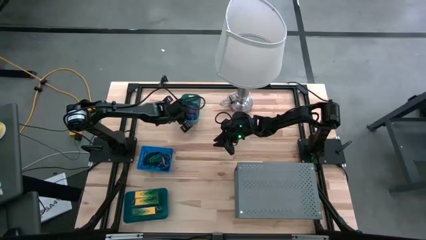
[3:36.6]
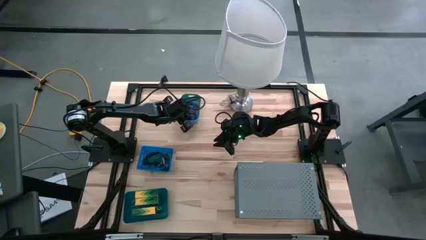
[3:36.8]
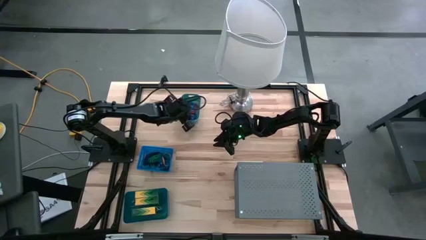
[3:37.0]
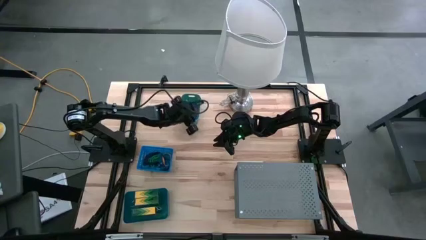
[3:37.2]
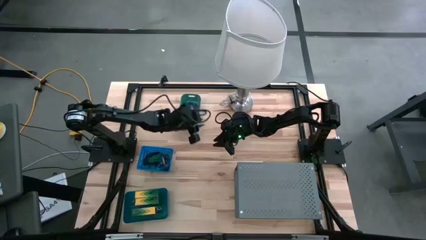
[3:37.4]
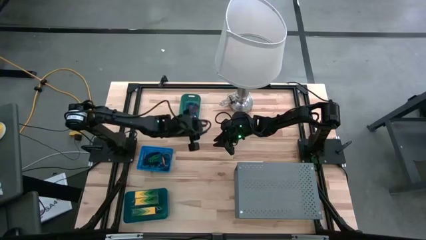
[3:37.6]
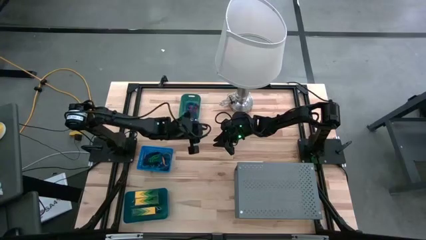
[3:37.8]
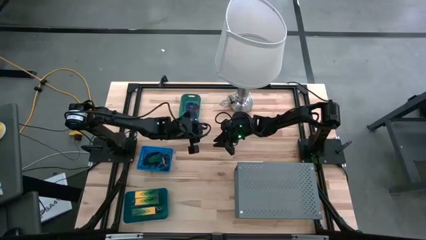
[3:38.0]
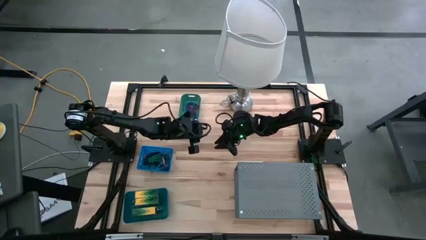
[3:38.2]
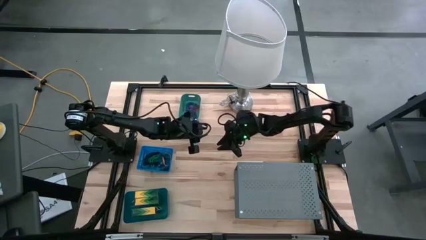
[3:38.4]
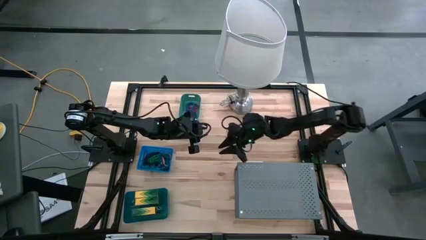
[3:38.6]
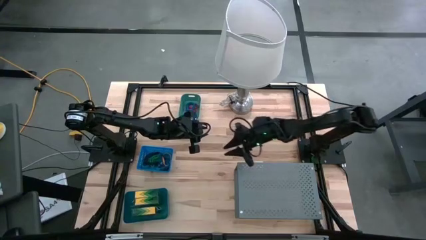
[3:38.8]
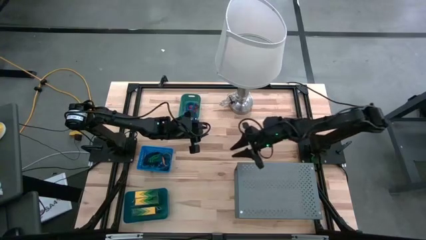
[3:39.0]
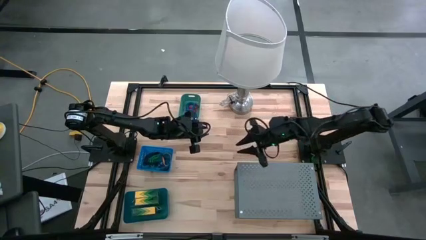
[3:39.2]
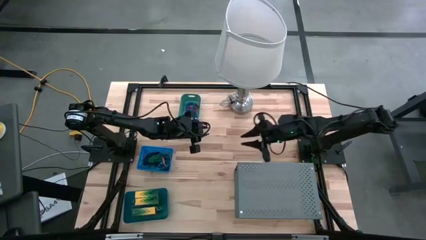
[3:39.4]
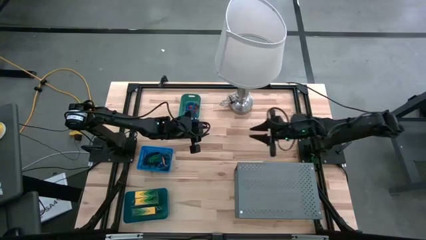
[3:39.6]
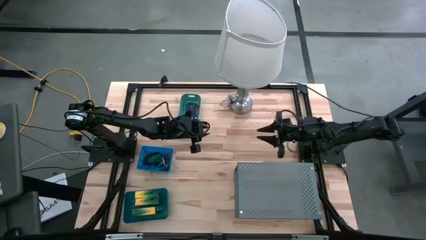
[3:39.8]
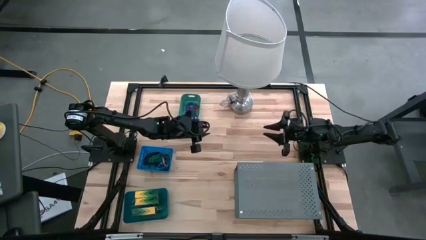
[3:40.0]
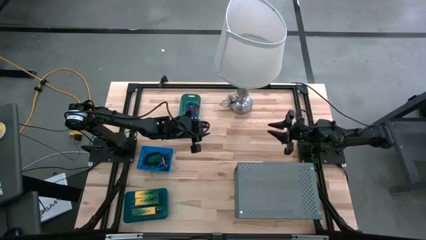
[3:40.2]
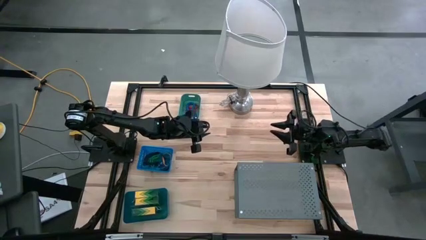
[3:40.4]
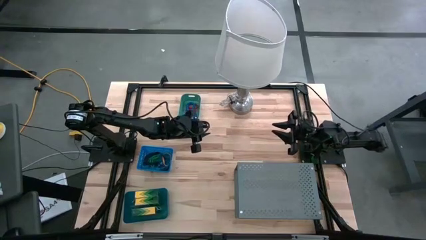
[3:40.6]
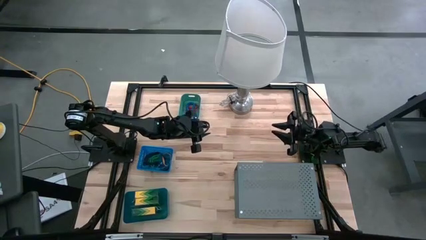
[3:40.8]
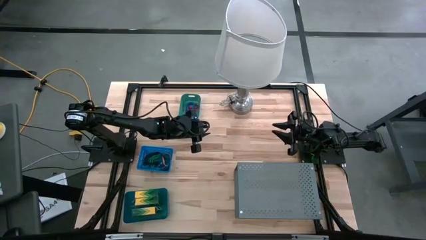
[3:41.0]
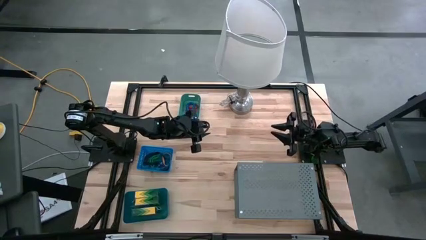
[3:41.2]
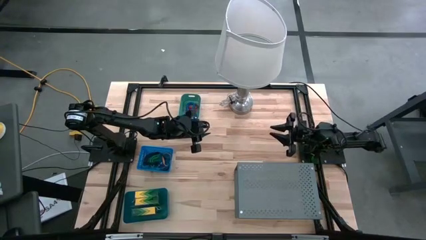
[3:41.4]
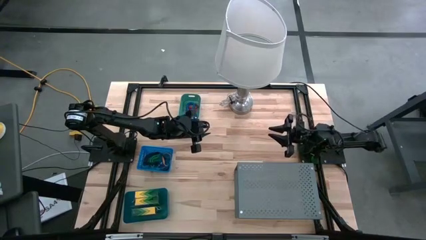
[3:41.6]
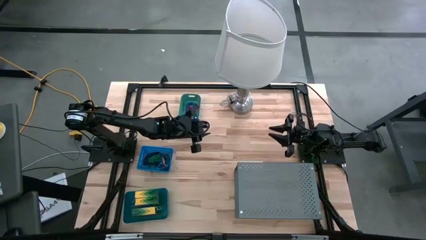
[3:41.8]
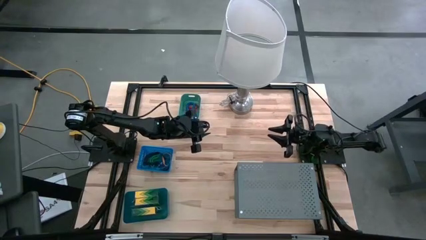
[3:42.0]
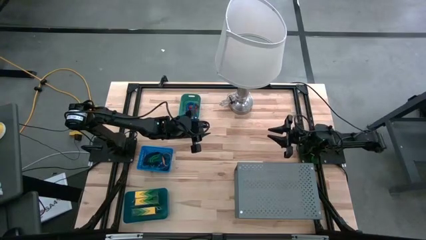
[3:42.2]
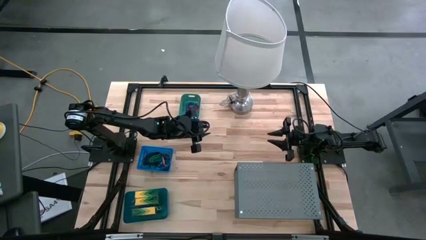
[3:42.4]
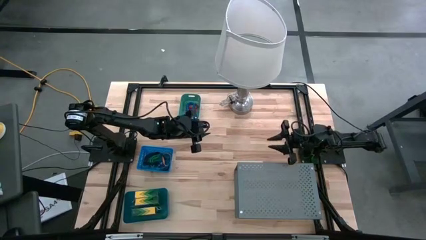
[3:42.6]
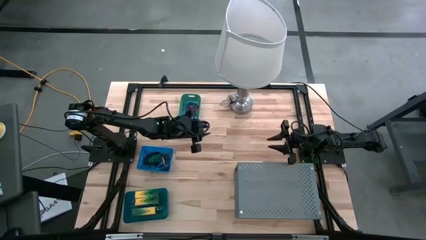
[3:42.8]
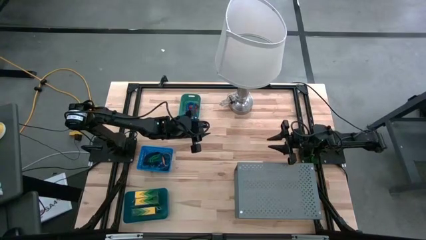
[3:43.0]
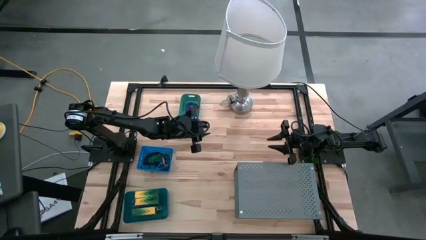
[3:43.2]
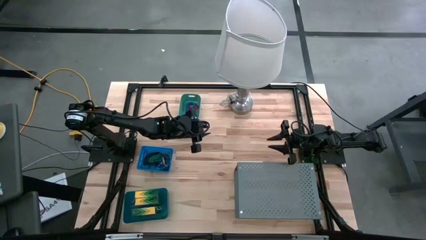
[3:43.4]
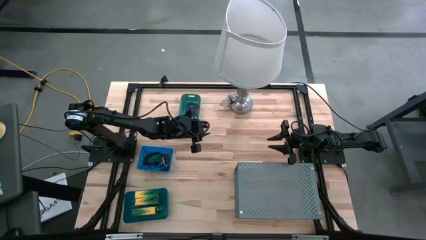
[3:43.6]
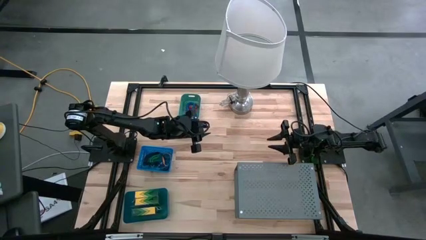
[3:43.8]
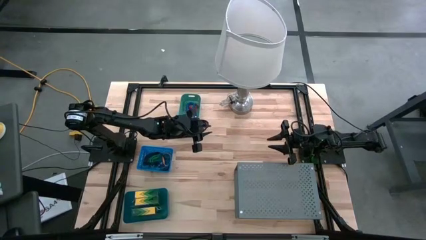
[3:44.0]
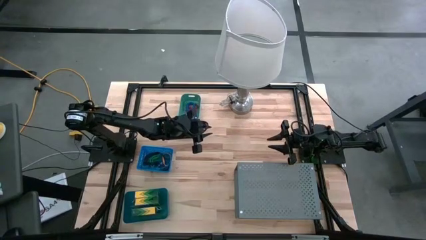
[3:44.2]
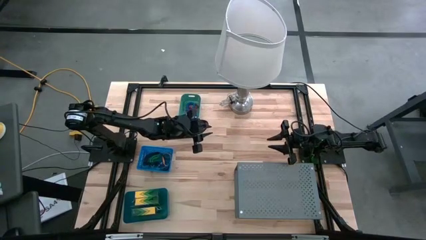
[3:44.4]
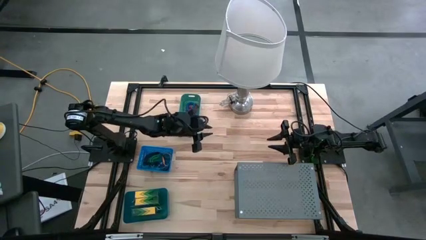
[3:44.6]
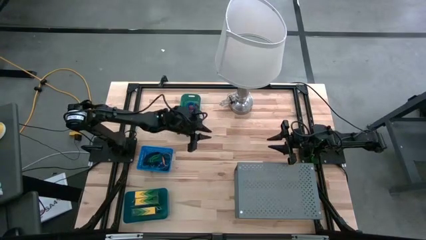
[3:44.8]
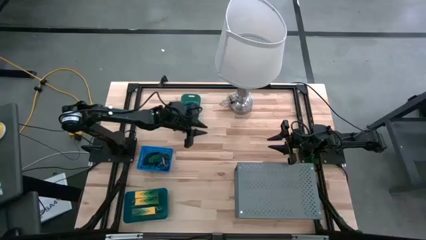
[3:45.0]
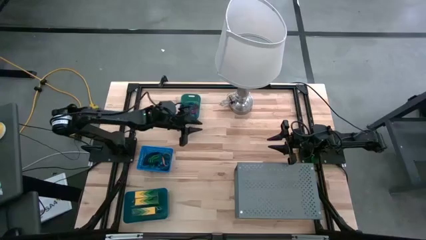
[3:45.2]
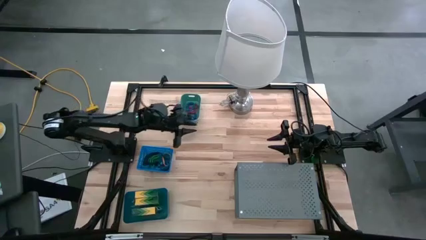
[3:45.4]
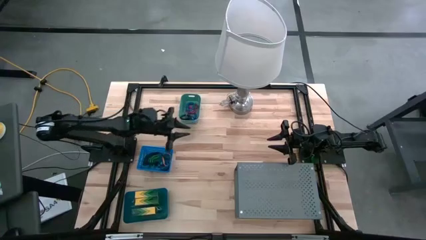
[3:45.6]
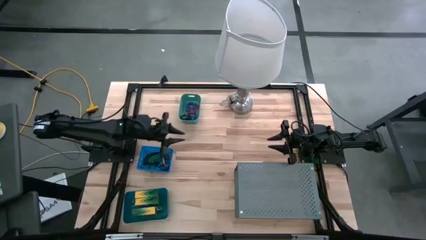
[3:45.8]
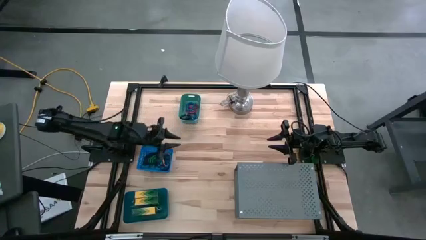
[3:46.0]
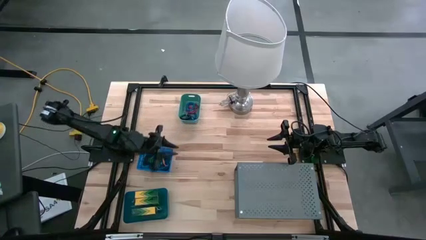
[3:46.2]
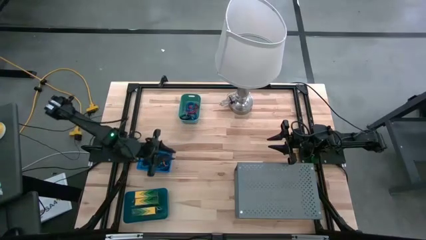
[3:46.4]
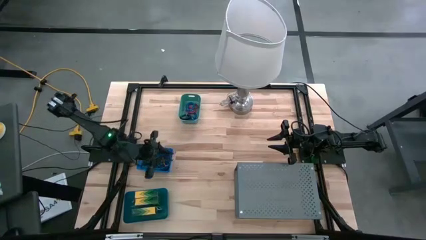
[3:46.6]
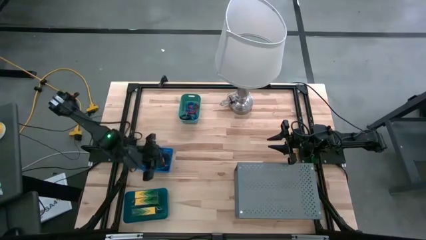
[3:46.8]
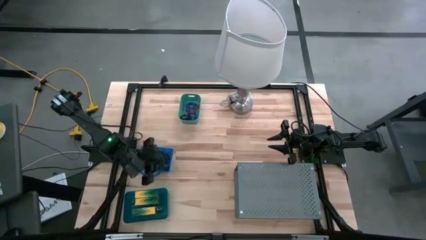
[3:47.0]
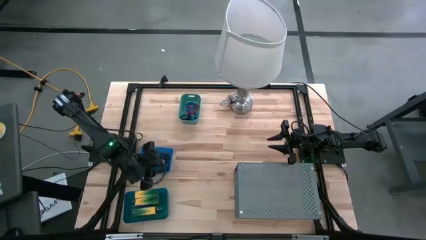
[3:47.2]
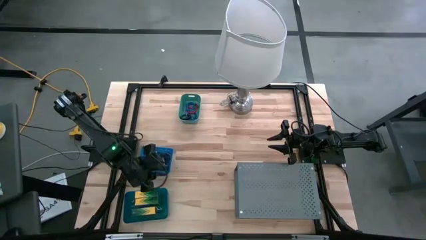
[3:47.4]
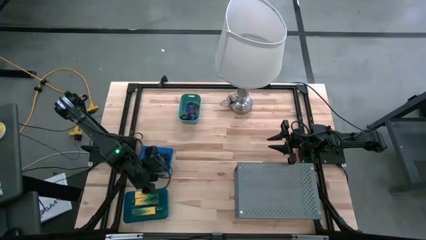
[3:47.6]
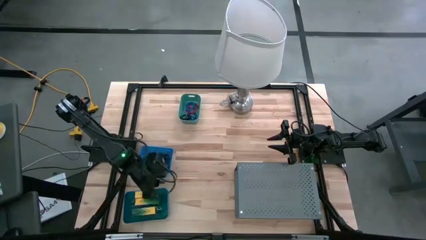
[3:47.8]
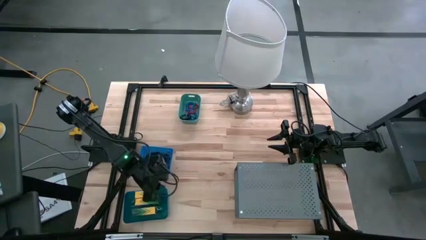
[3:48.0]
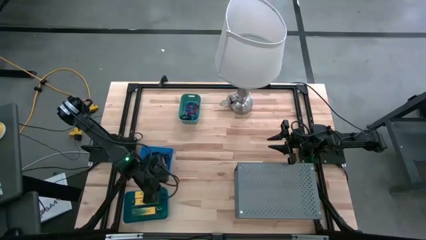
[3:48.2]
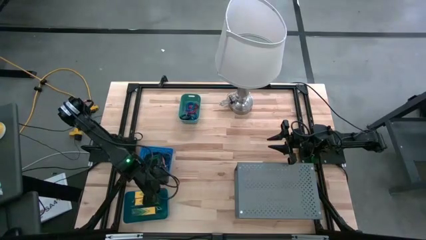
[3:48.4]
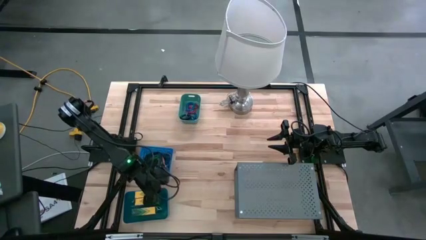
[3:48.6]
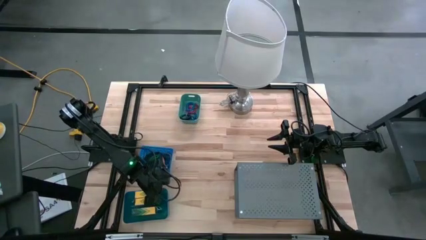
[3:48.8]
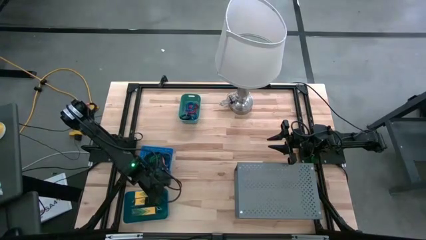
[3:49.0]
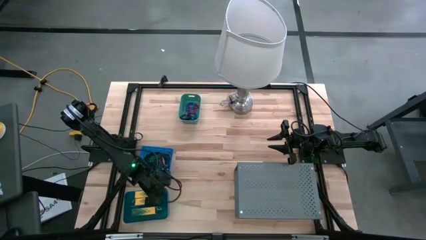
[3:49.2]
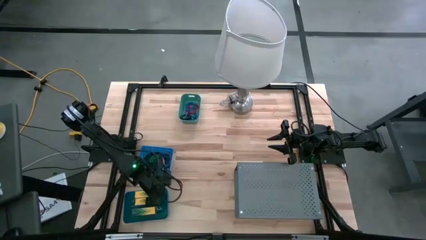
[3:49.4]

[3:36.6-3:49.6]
Task: Pick & Place Office Desk Supplies
Move the bins to the center of the table

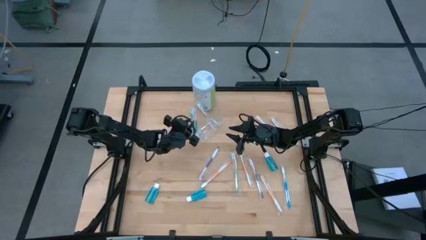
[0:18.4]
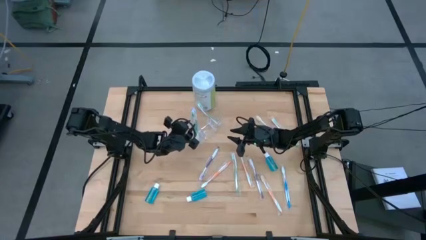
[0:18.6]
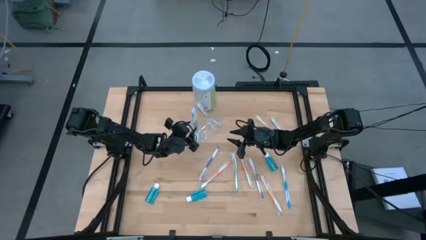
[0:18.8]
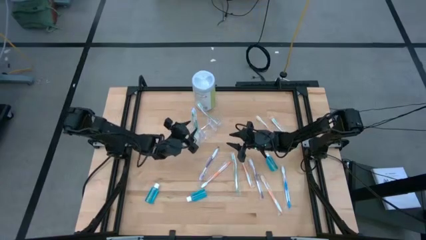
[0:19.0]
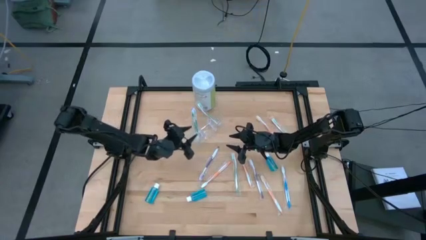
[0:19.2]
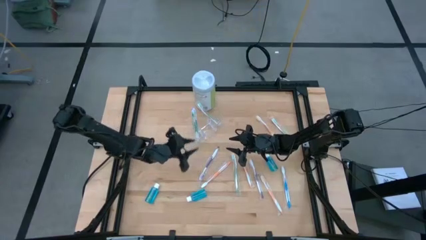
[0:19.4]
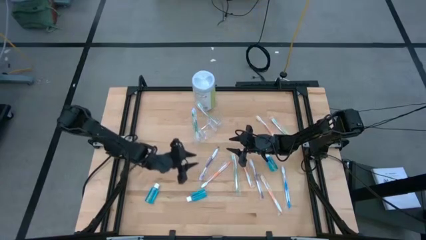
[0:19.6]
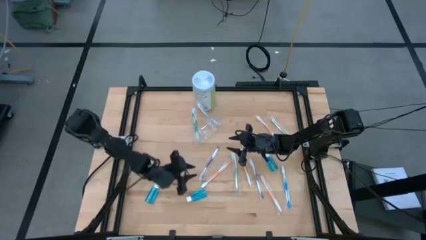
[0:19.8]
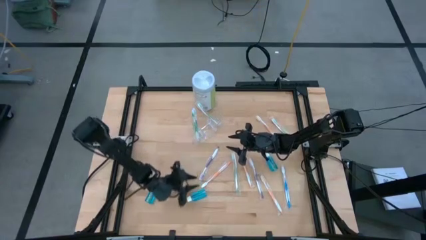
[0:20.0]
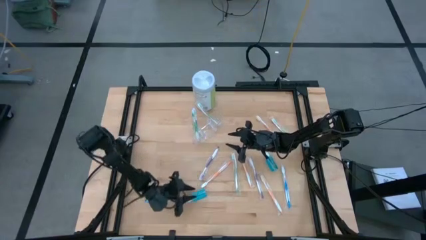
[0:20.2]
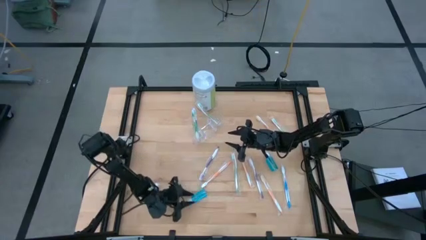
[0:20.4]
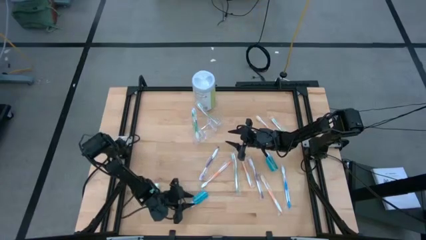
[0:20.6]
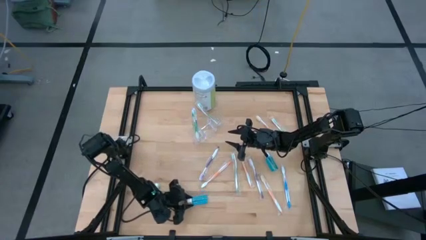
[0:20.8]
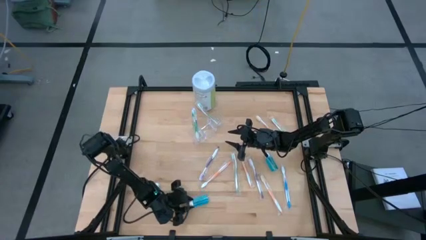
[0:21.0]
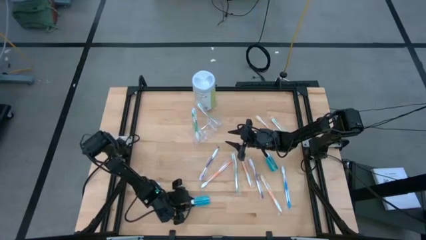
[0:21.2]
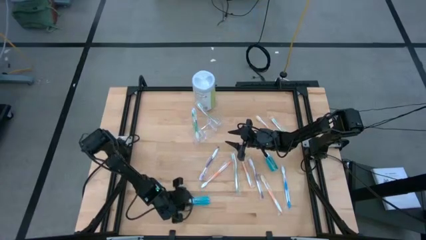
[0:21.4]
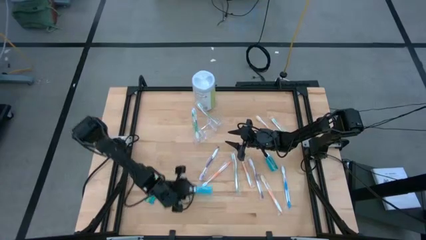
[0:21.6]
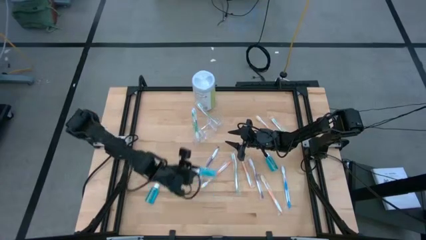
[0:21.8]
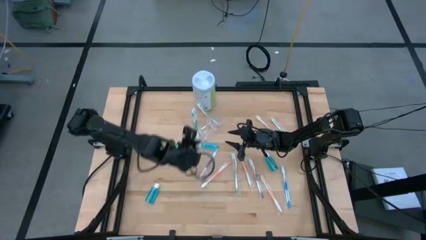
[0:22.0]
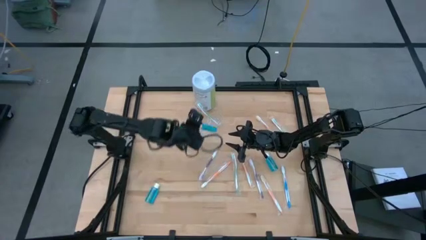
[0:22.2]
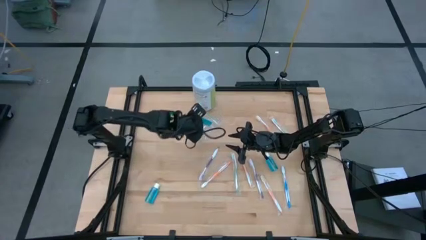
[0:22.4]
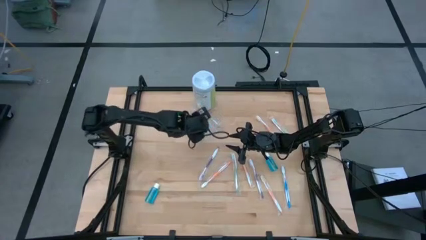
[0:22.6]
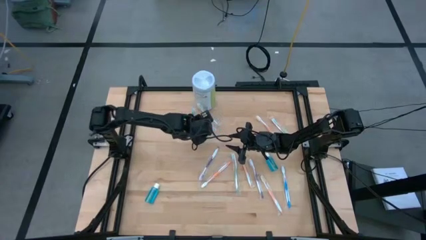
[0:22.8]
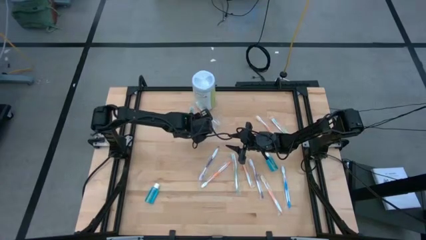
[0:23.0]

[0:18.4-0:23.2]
Task: Pick & Place toothbrushing station
Put the blue mouthwash into the transparent organizer
